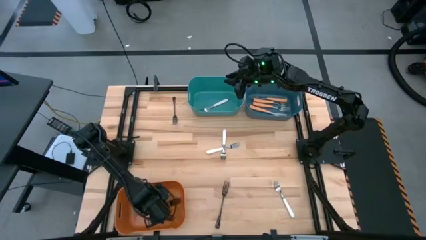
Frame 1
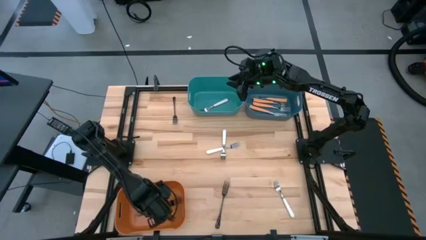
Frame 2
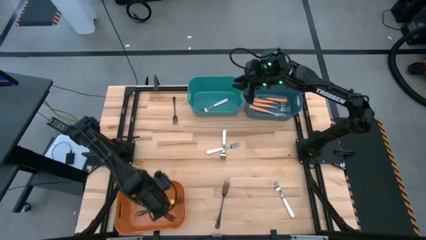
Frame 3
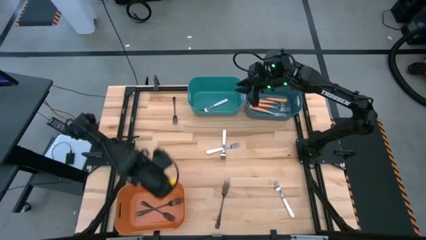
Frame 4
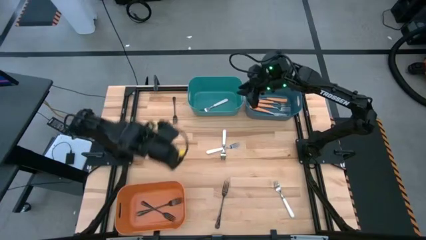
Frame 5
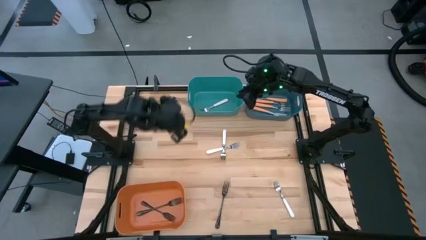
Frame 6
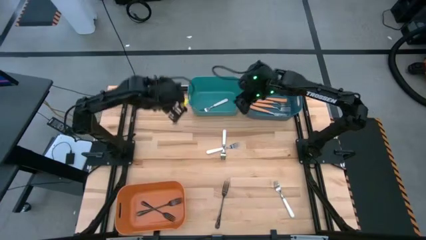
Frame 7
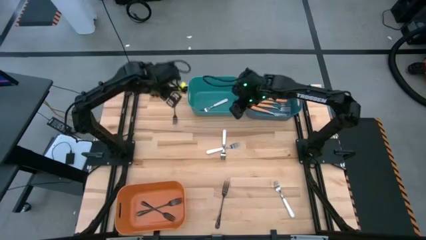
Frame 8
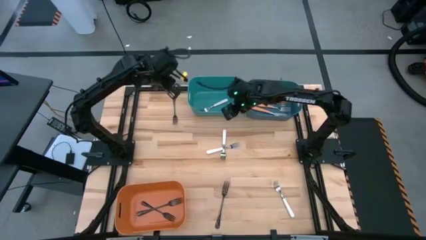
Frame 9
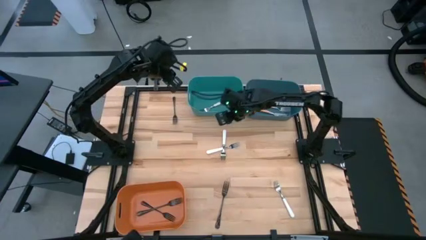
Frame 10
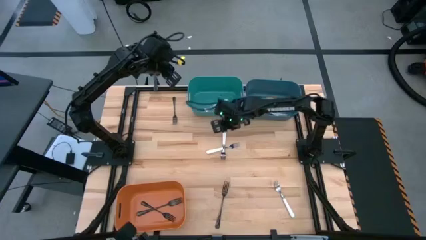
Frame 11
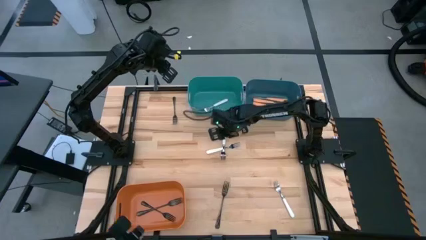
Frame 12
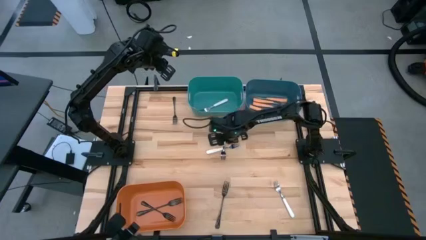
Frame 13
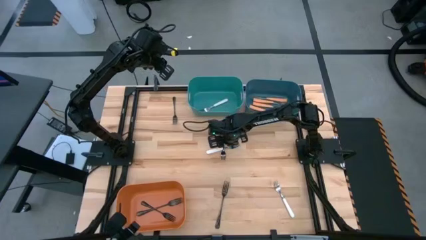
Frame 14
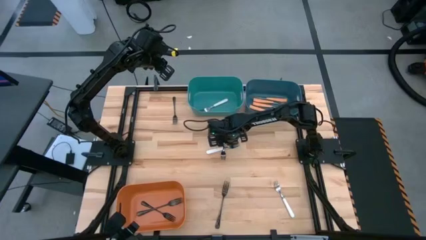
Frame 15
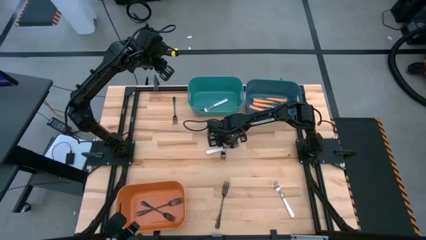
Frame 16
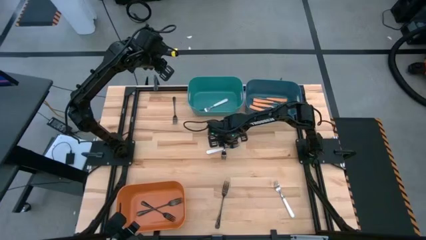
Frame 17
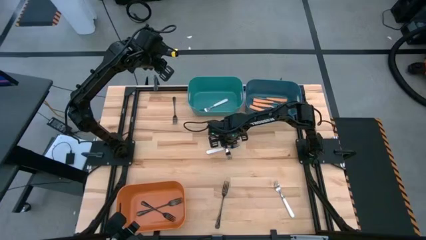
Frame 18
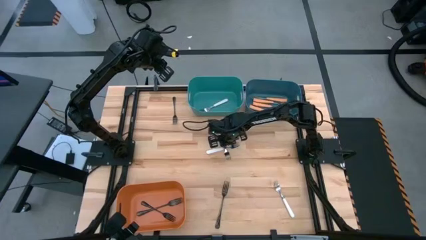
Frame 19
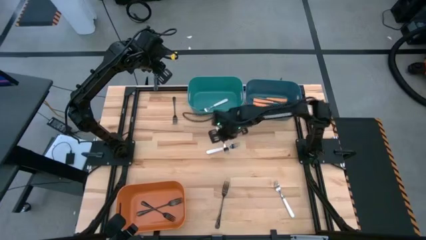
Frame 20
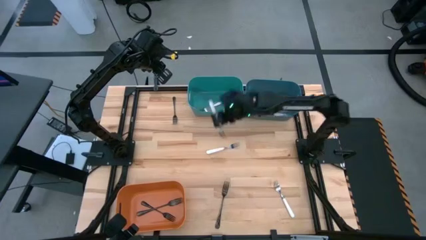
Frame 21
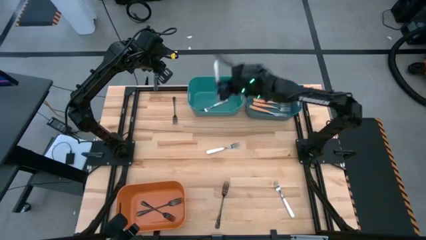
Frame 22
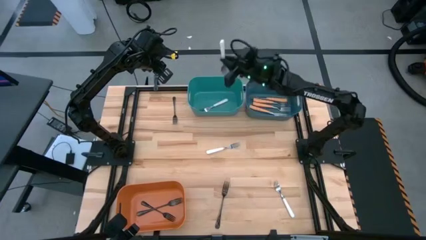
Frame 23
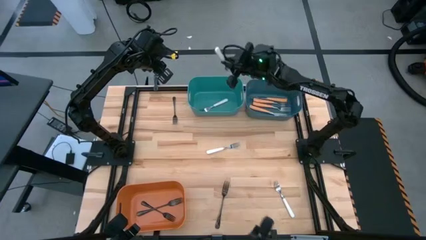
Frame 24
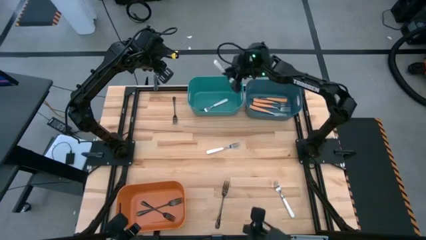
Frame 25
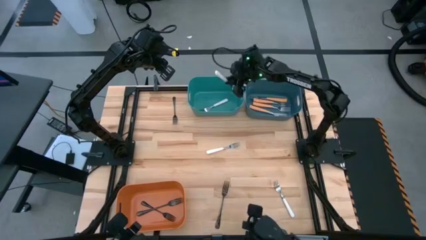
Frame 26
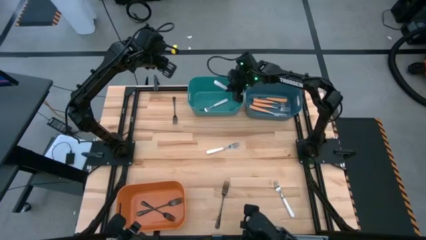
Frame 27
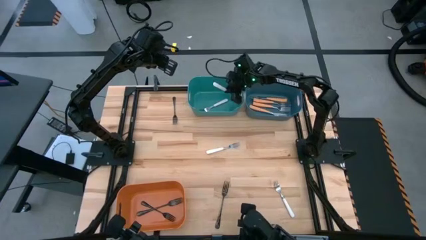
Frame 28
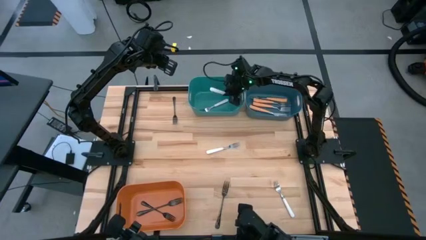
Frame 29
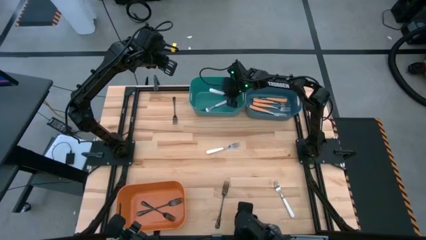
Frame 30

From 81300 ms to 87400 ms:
Task: Sort silverware by color (type)
Put the white fork into the green bin

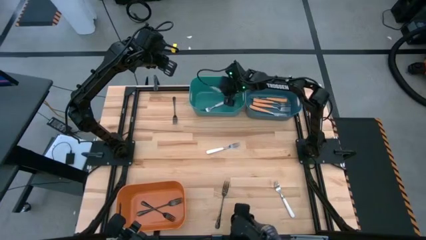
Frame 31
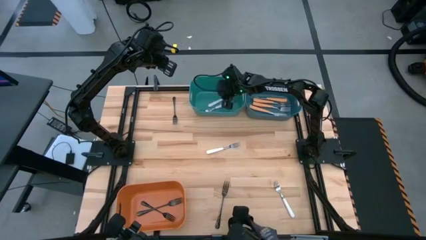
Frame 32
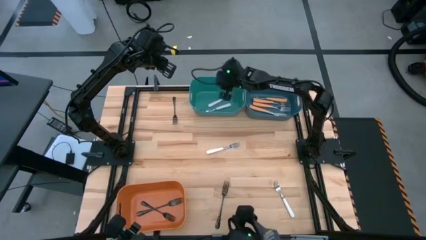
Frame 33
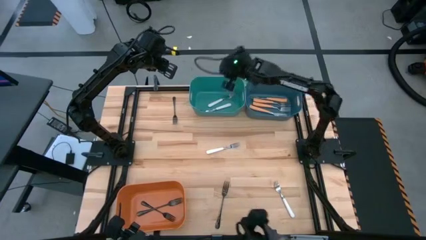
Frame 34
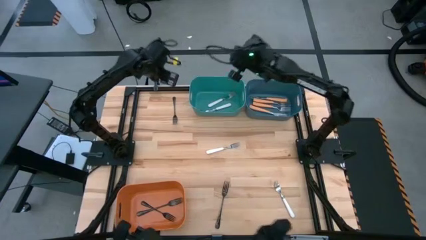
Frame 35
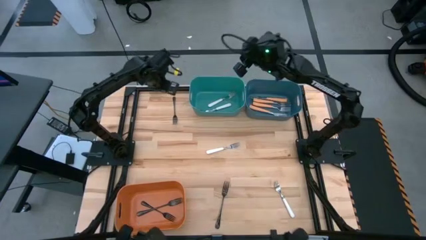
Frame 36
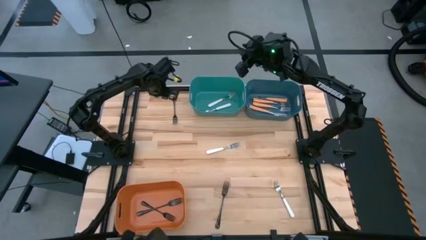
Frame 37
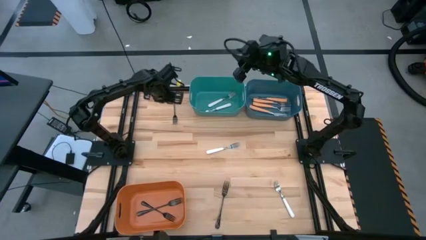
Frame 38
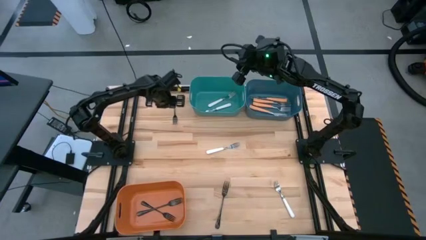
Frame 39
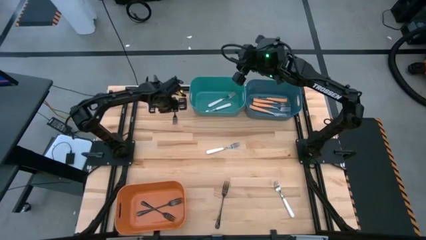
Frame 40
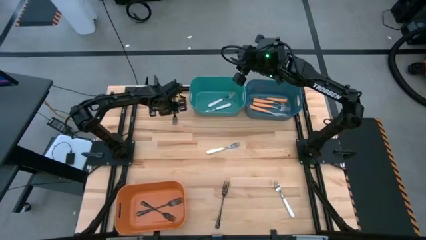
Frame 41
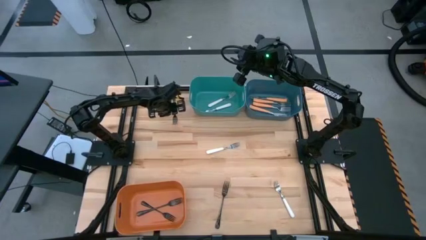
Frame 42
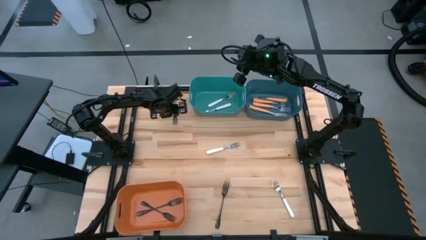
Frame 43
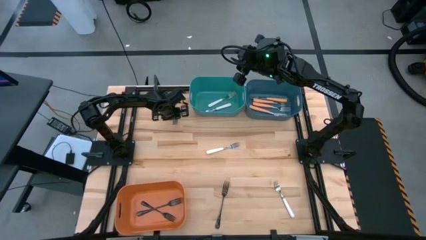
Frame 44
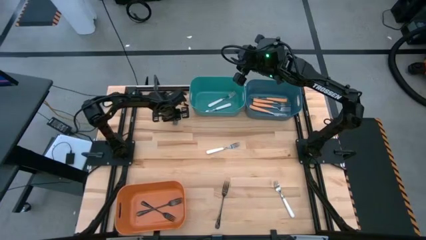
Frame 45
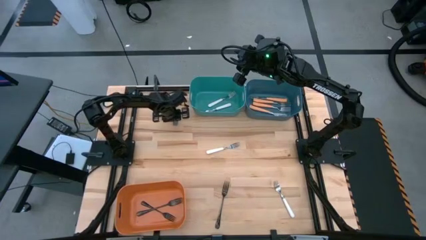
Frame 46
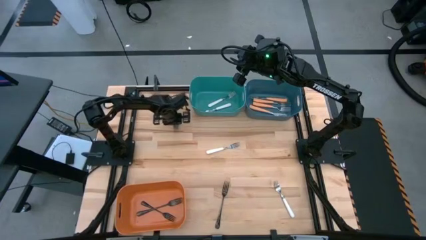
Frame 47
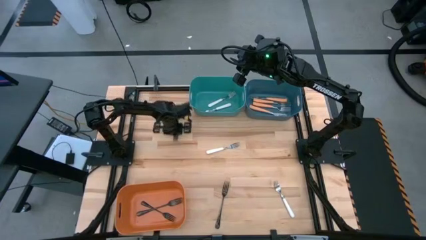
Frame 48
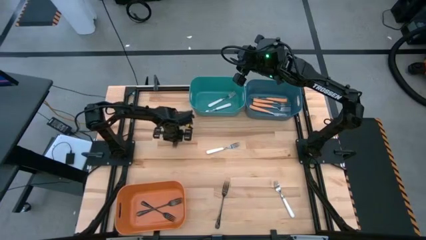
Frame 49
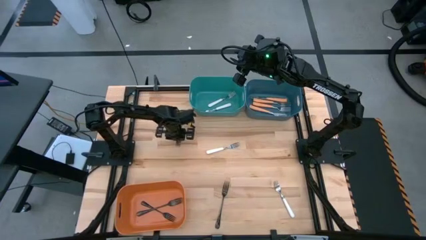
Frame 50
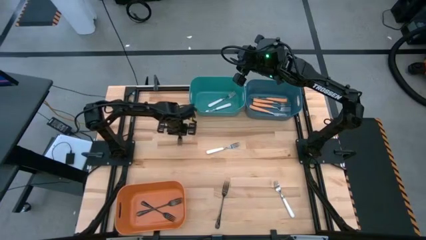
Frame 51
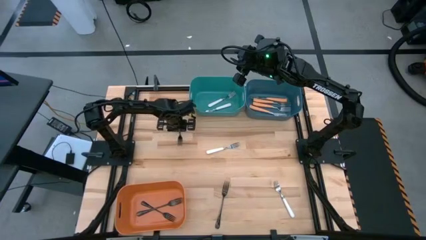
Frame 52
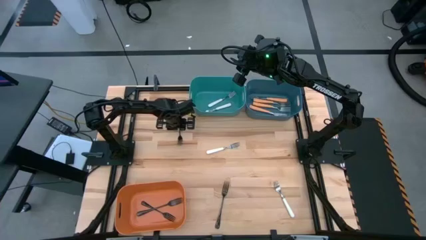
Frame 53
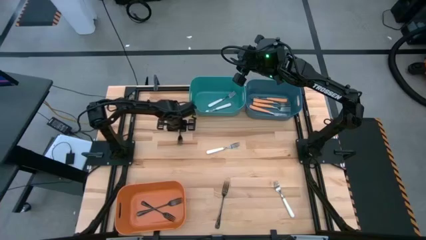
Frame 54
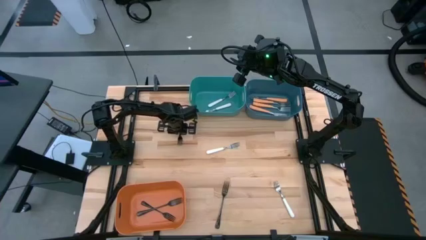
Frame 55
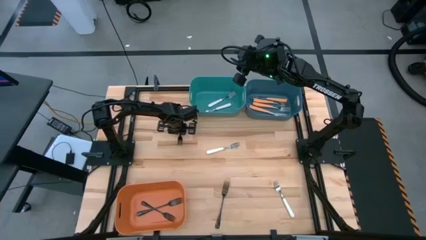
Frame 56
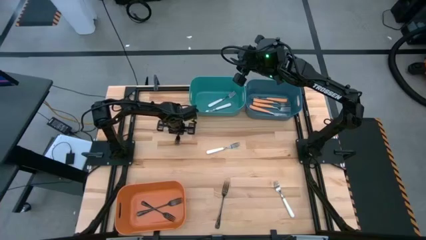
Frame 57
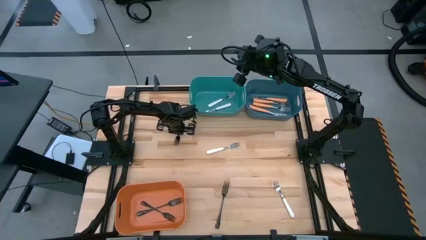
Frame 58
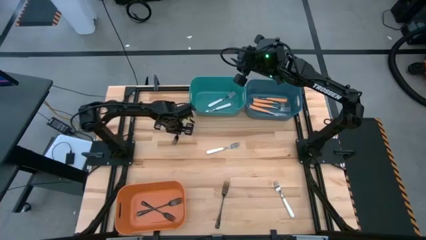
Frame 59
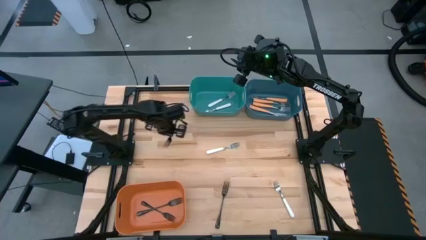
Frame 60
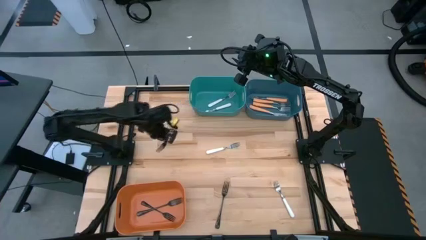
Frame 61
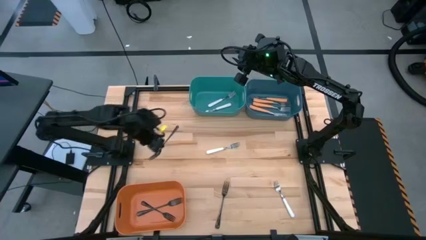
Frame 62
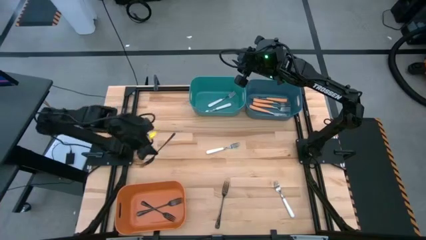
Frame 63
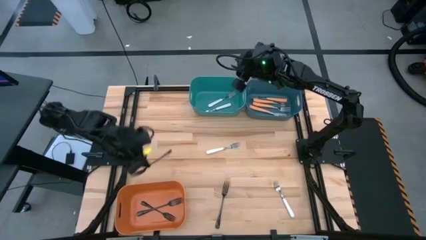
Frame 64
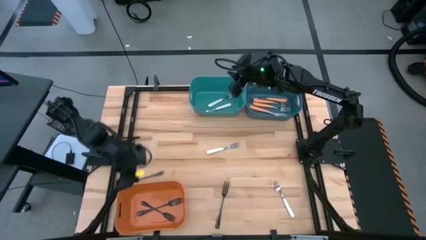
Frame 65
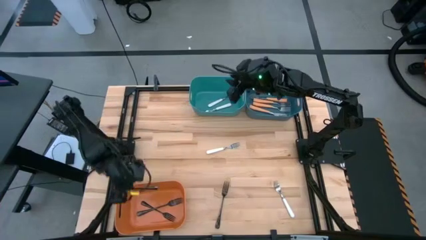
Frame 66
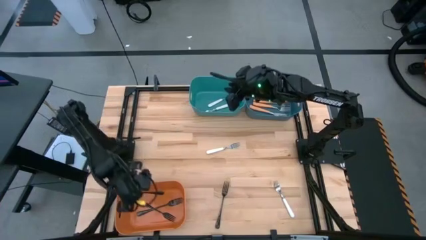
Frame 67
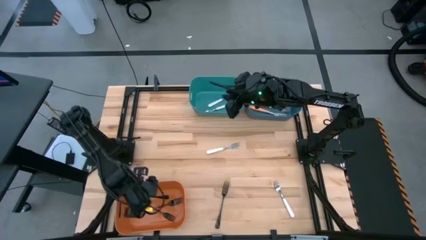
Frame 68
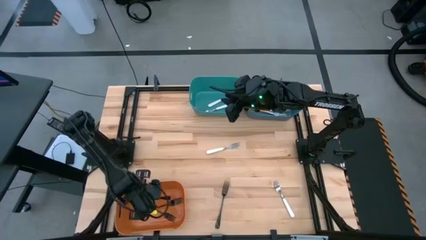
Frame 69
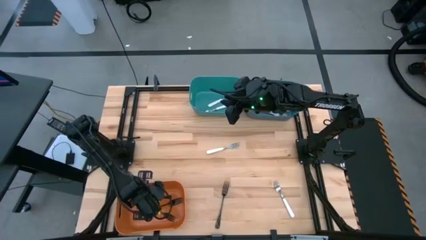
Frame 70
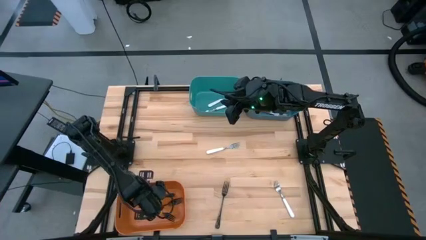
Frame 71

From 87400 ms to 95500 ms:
Put the black fork into the orange bin

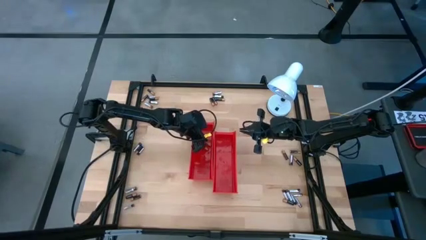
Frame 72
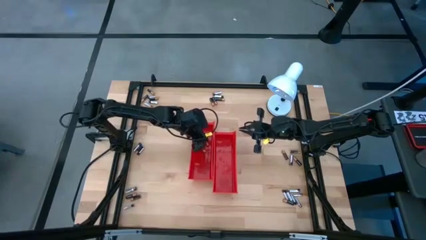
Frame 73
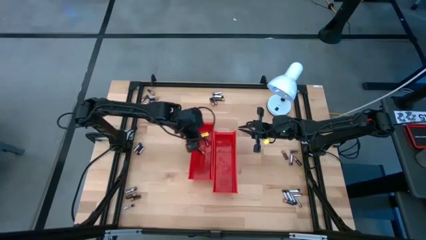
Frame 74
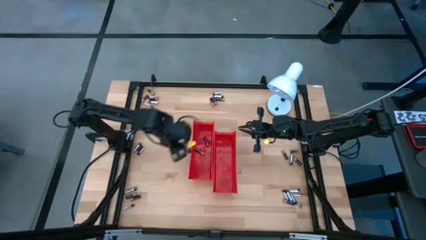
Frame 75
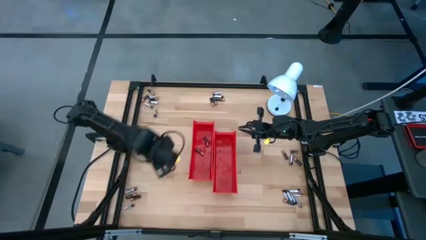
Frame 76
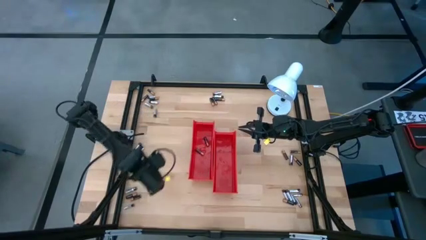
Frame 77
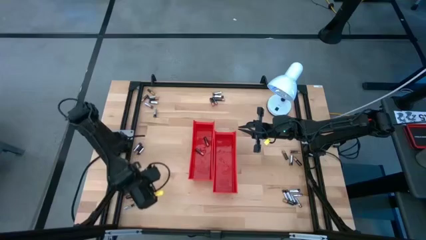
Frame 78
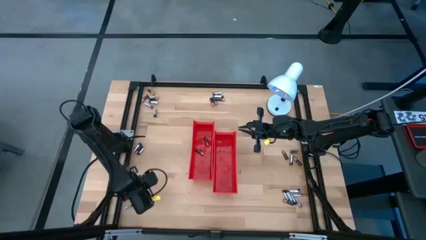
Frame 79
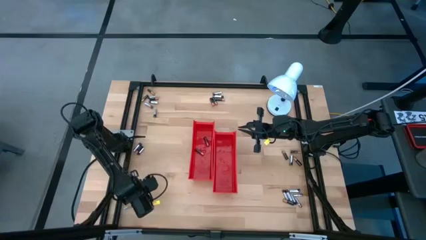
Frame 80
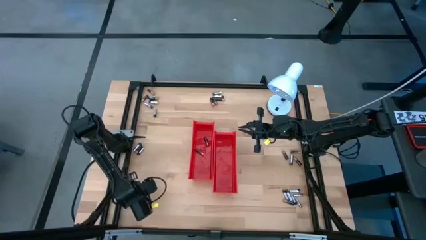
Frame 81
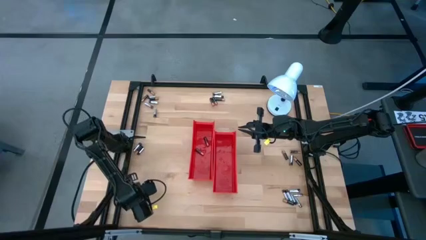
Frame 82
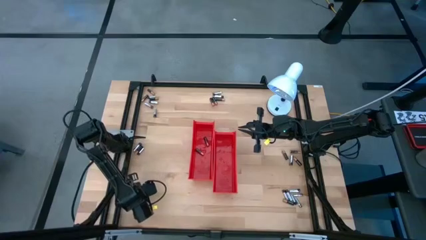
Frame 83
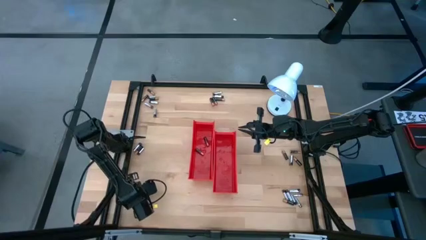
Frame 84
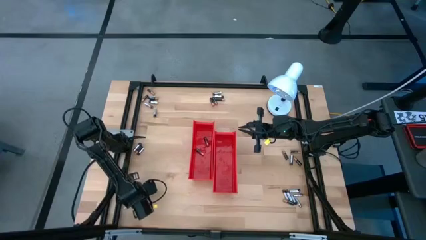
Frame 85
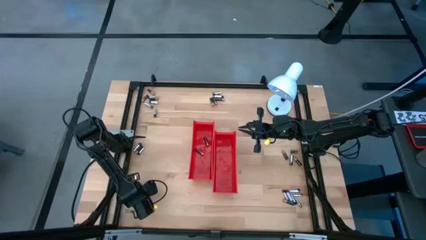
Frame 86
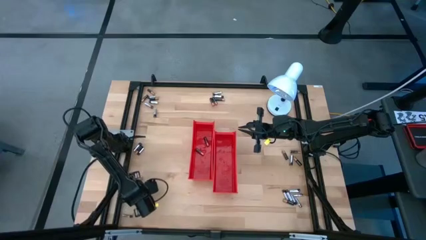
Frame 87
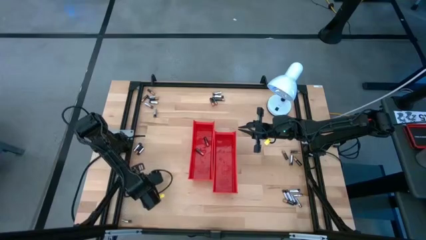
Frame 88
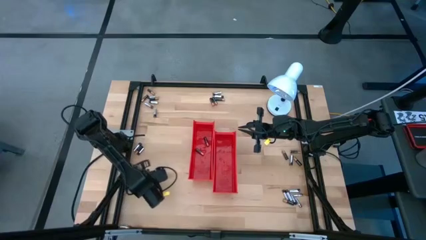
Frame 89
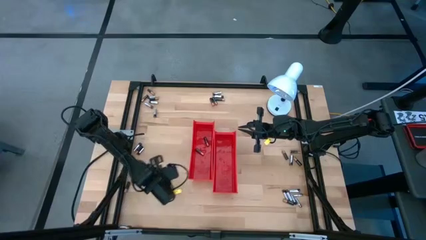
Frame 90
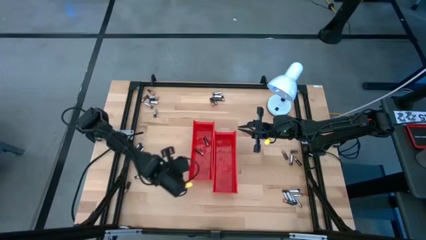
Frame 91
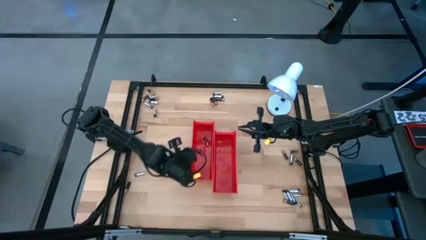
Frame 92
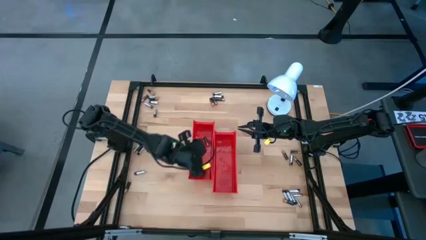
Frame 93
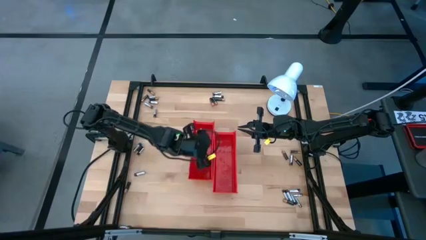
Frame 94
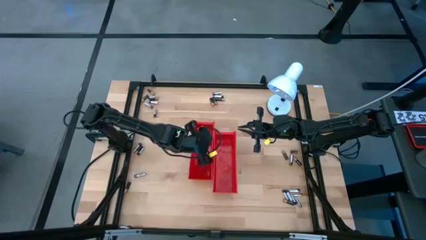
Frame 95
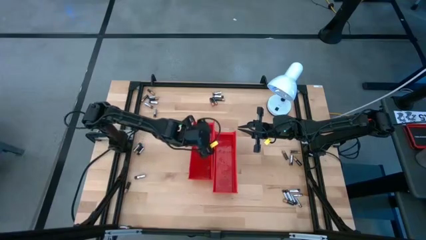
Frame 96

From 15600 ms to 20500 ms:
Task: Sort batteries
Put the black battery into the left red bin
